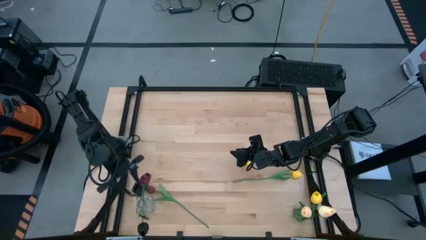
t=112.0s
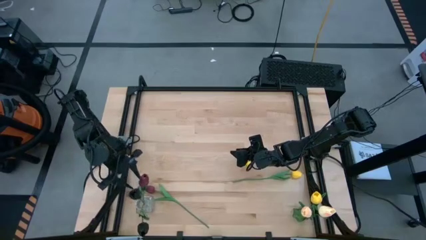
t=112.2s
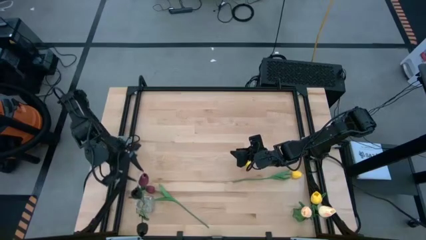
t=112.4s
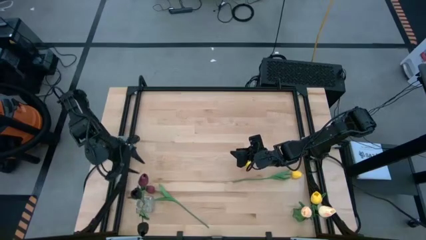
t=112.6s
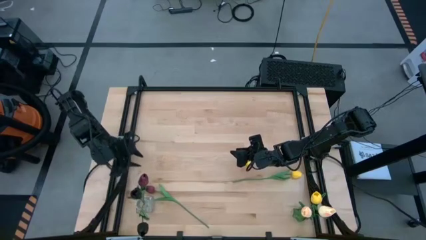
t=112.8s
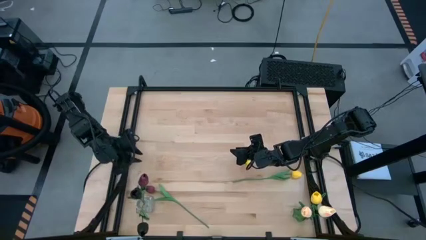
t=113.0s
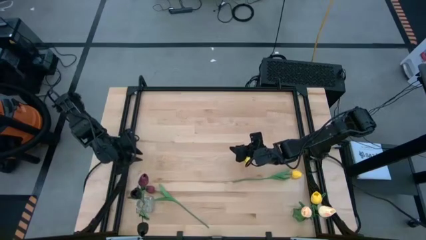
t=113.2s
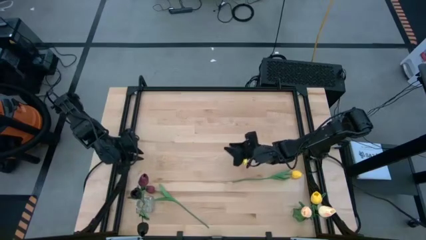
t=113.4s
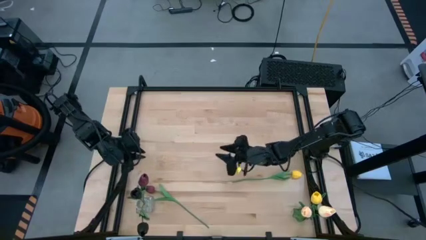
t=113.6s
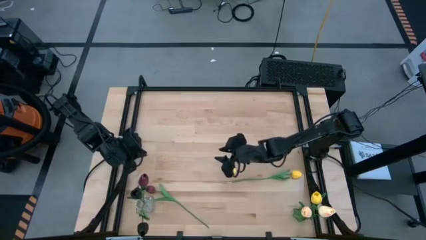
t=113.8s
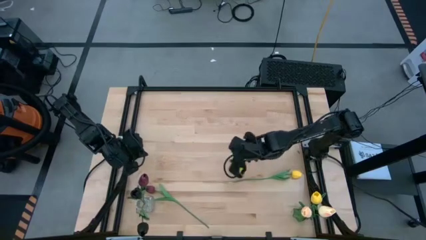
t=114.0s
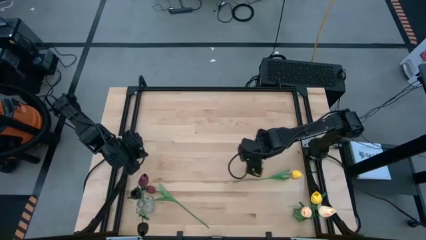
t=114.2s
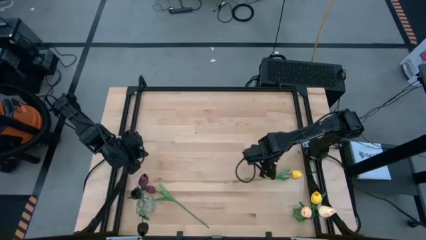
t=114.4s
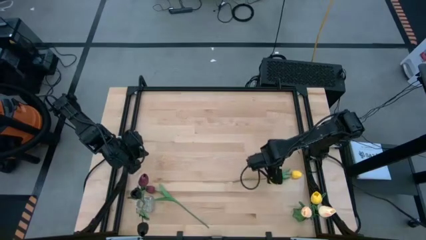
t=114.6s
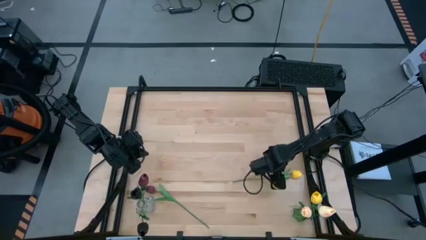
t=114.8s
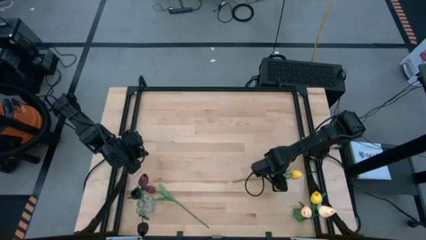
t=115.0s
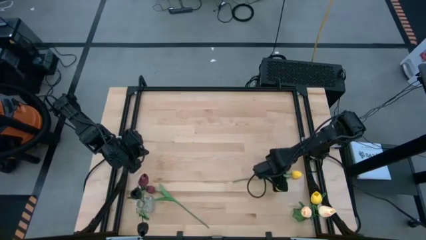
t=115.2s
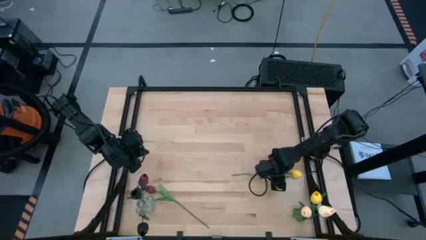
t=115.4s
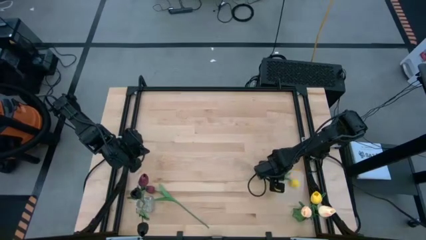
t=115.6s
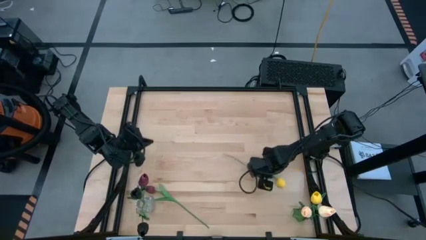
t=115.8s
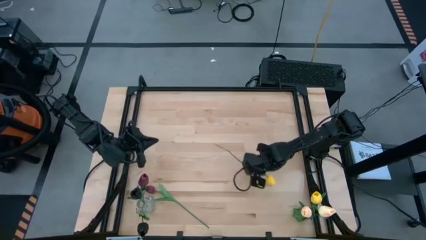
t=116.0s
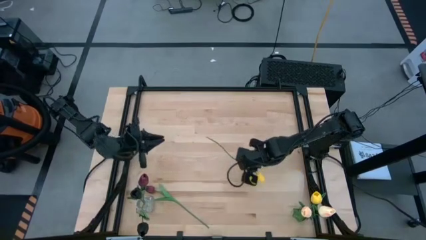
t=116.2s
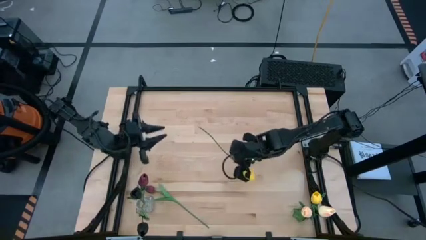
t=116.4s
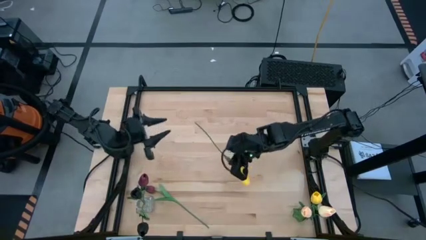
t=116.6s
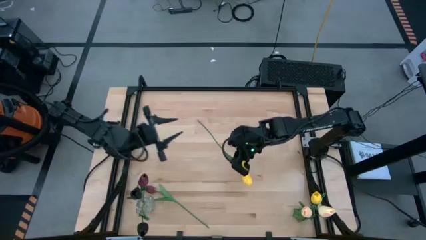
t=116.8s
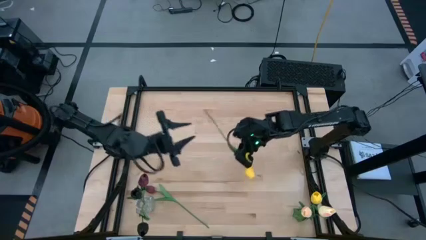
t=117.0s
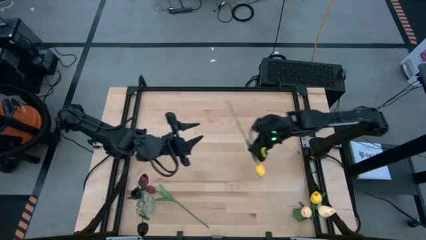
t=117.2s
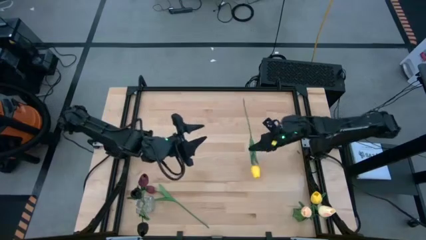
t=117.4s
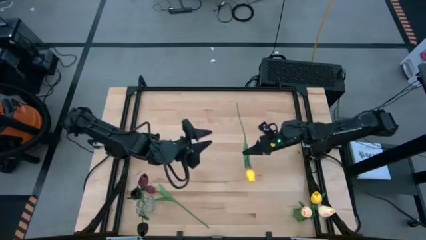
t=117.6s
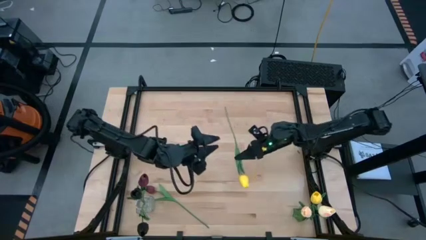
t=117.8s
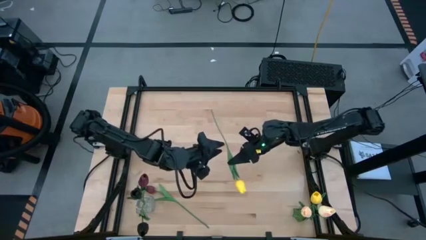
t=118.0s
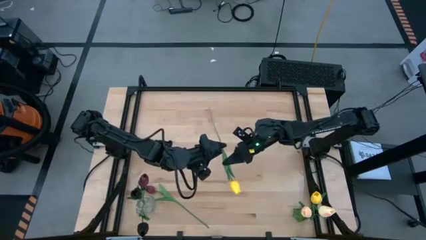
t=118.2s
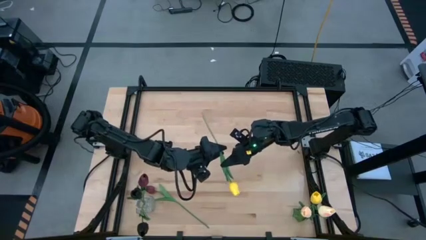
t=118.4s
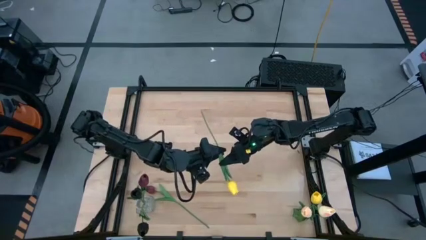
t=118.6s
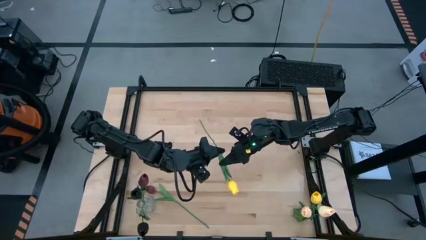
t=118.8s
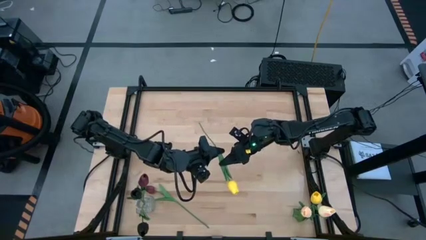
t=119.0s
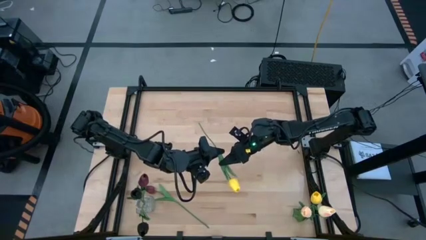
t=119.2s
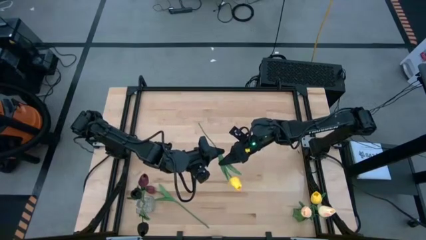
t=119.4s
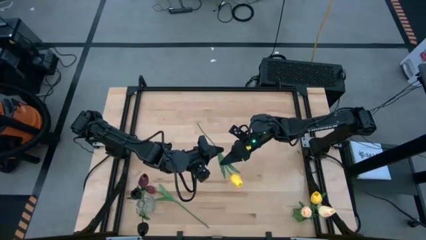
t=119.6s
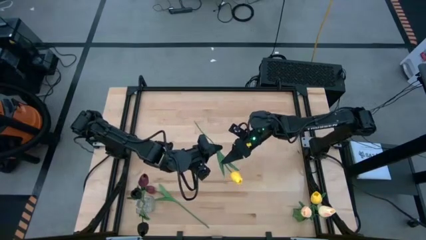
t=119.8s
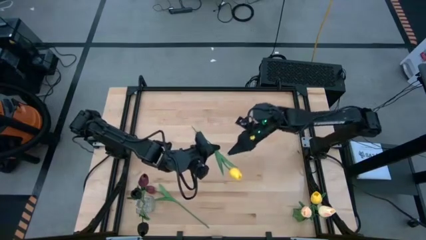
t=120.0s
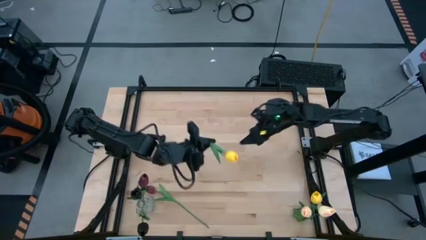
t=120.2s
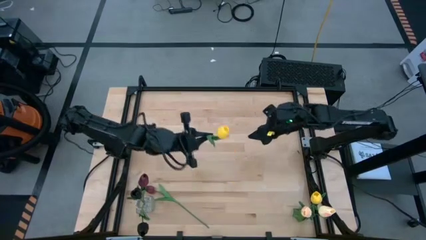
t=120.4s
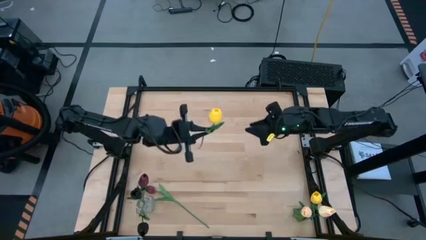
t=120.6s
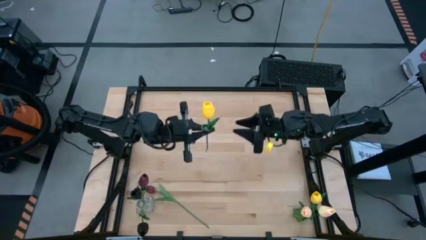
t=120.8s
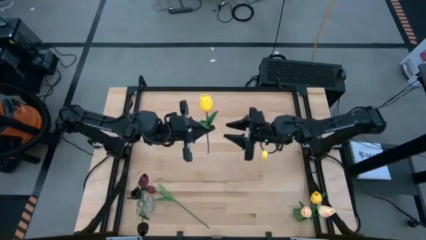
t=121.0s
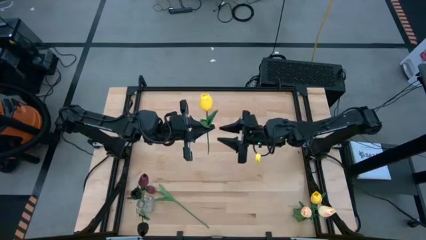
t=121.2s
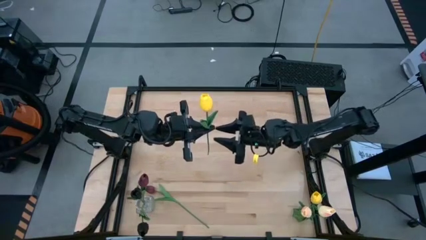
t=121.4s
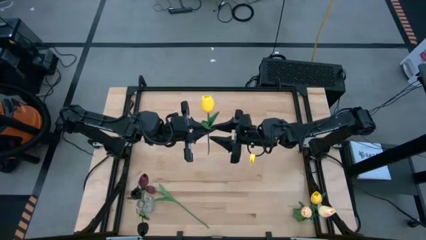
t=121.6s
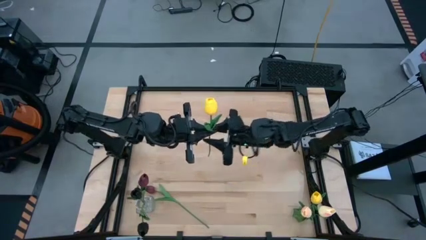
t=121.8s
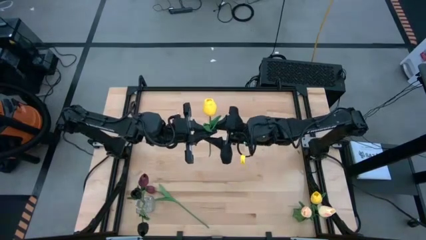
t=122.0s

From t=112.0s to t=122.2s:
Task: Sort flowers into vase by color
Put the yellow tulip into the green vase

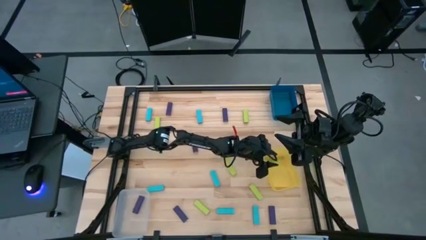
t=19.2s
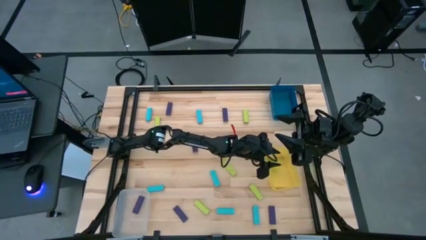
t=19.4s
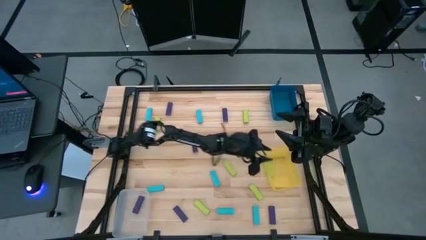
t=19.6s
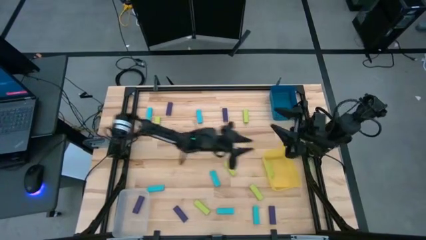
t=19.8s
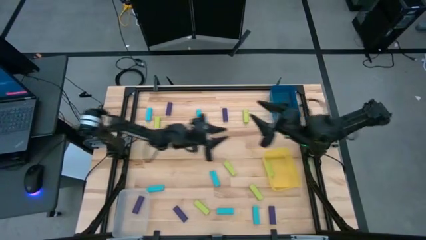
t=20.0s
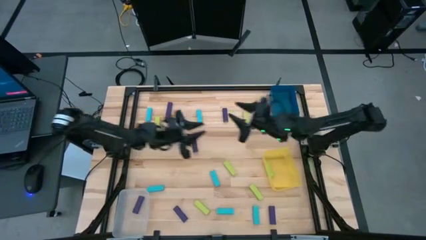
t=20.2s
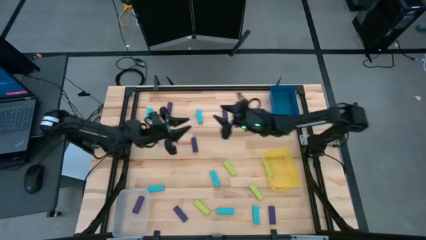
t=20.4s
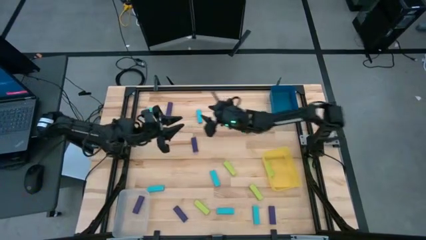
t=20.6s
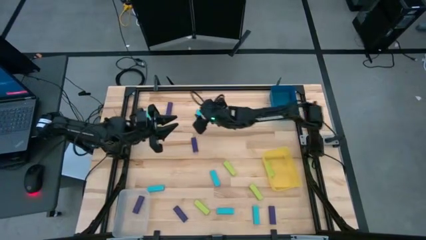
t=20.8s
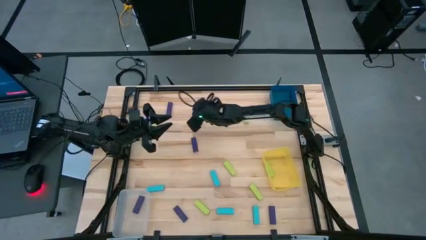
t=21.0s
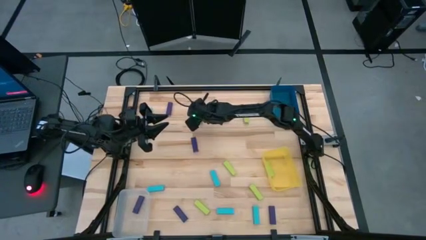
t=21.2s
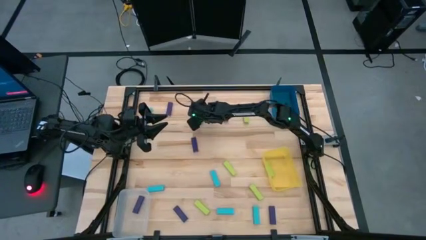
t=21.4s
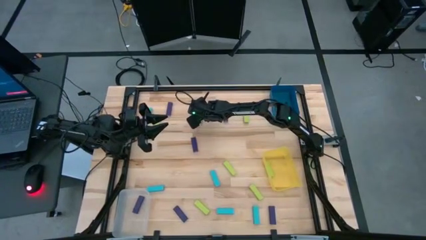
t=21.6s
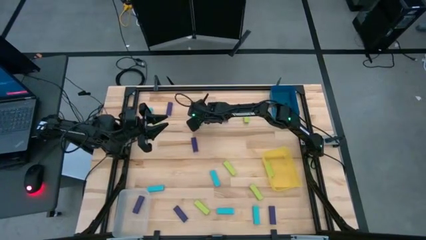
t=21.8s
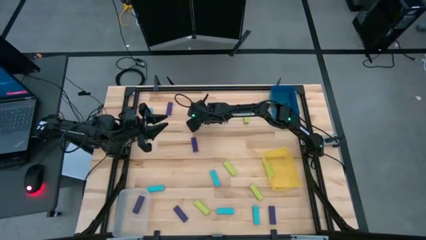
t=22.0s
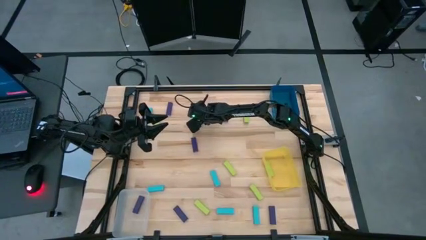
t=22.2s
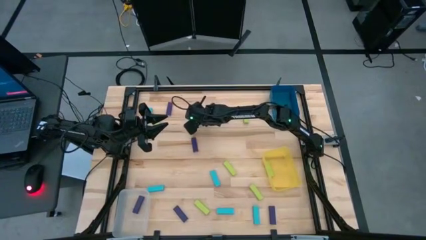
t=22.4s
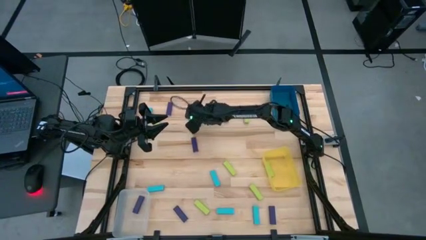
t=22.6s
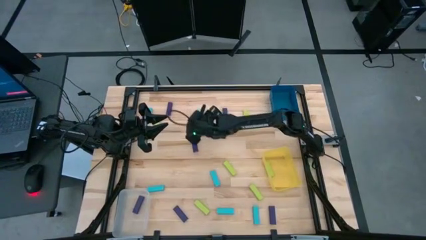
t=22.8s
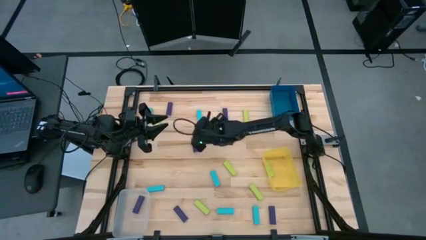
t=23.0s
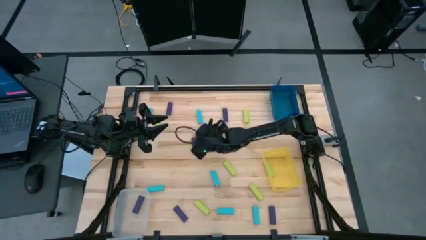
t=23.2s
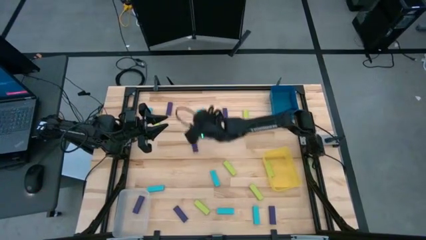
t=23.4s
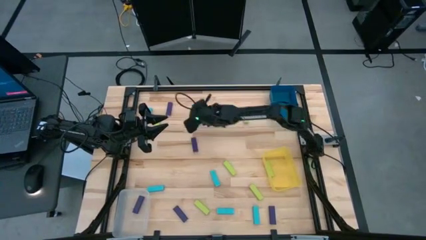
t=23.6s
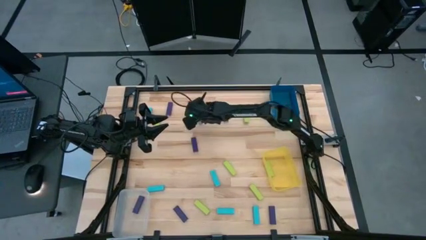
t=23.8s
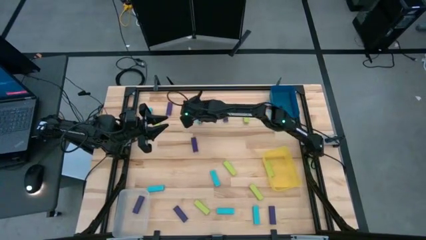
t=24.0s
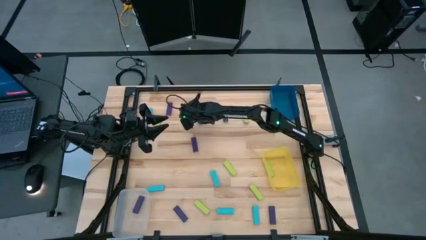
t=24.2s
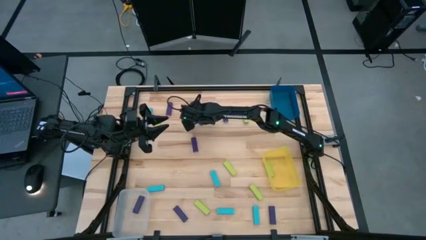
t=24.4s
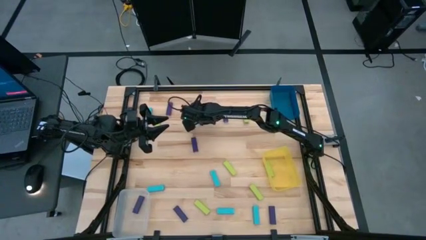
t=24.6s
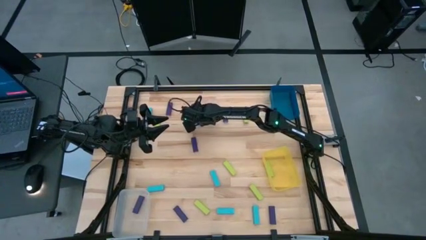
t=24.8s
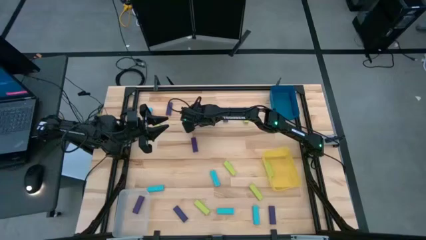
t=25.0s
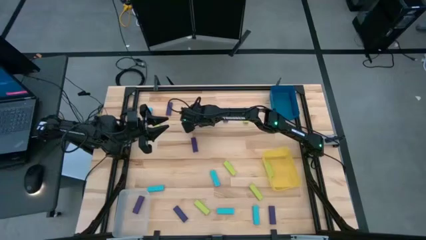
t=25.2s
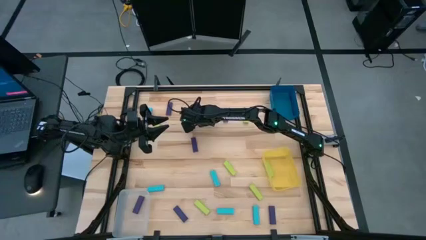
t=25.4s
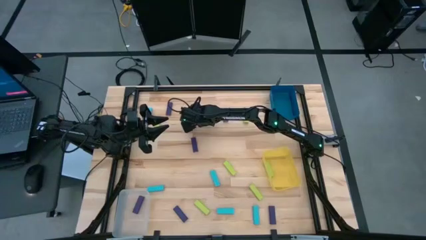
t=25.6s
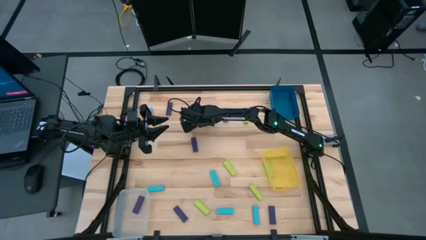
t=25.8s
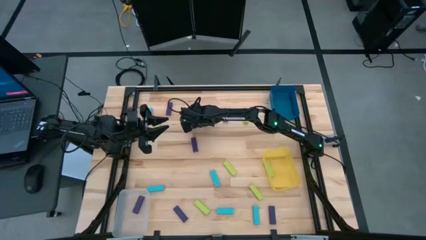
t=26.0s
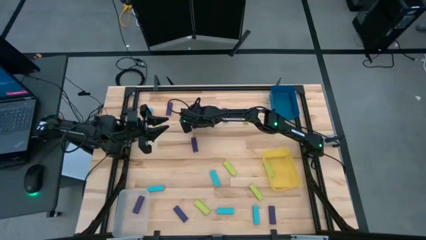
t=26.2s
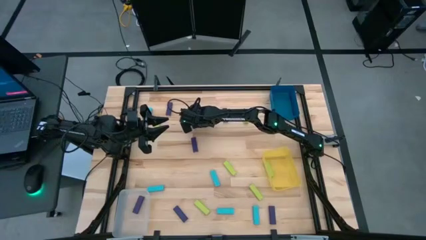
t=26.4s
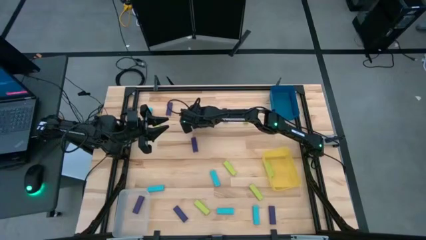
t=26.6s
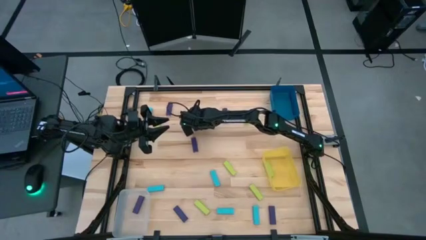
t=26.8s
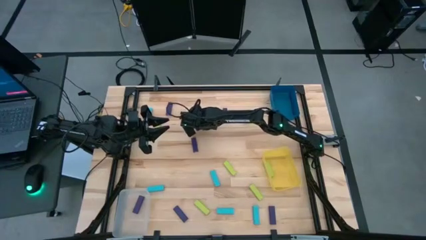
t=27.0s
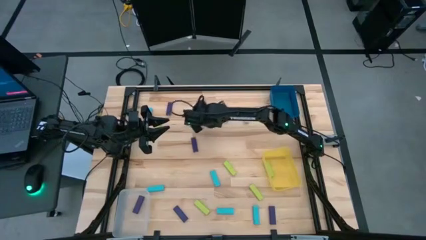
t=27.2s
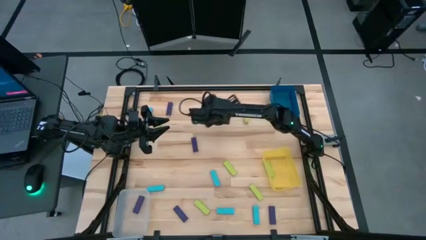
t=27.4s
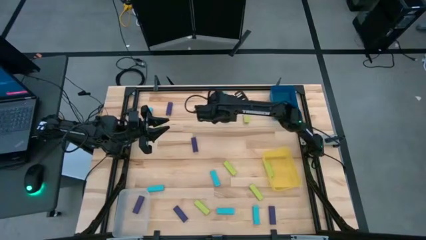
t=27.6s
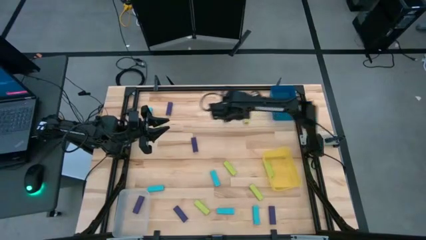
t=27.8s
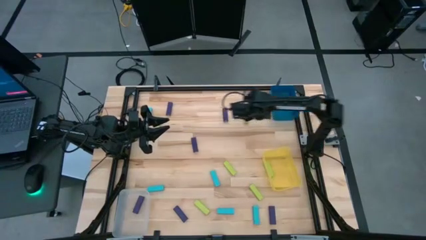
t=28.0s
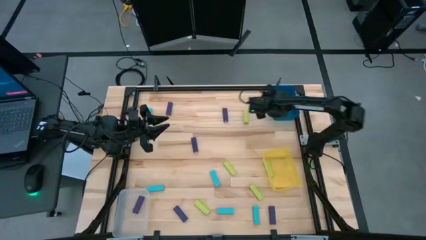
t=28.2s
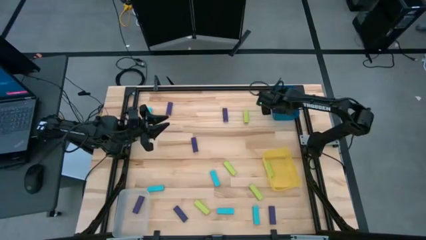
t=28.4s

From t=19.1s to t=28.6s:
Task: Sort blocks
Put the blue block into the blue bin
